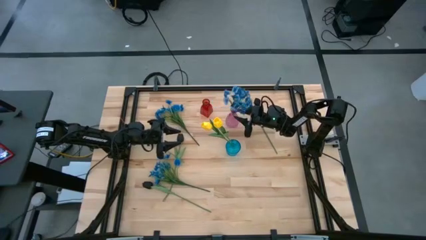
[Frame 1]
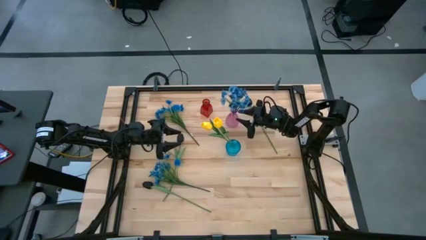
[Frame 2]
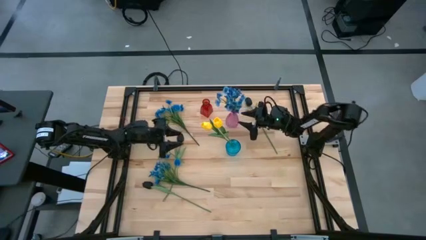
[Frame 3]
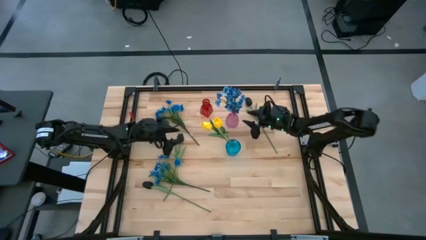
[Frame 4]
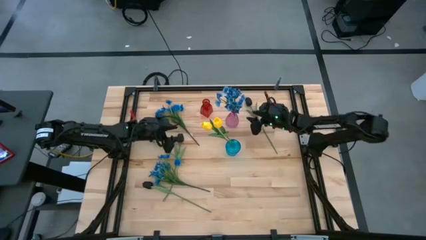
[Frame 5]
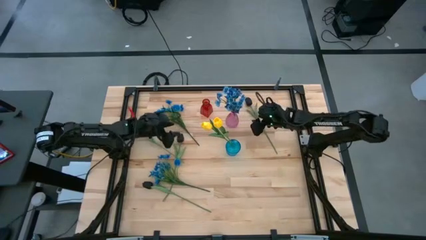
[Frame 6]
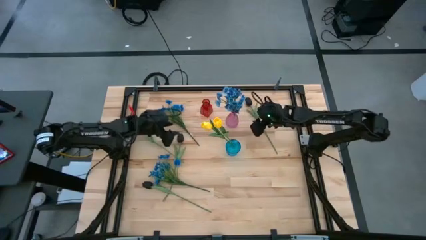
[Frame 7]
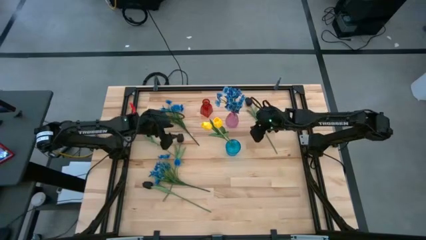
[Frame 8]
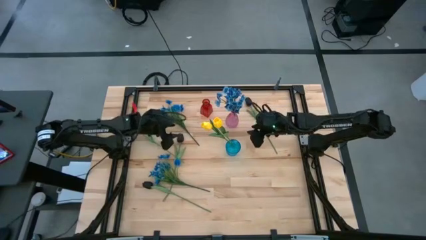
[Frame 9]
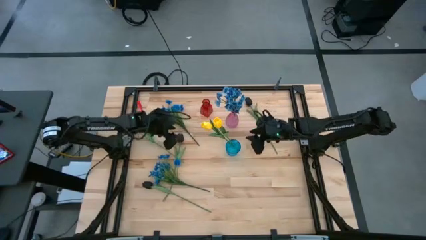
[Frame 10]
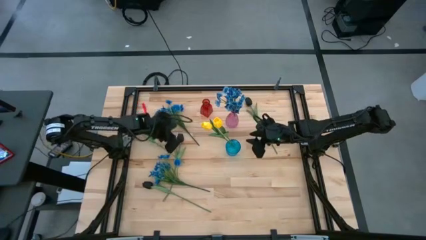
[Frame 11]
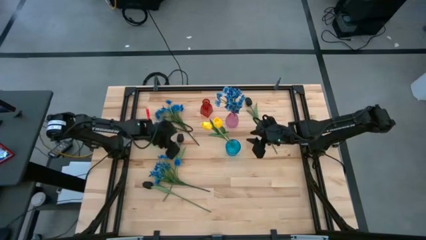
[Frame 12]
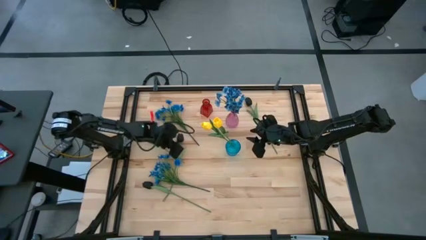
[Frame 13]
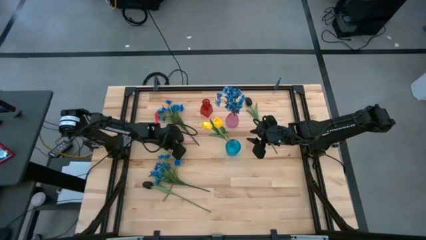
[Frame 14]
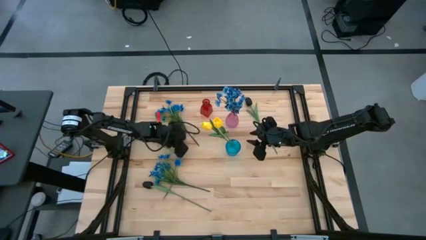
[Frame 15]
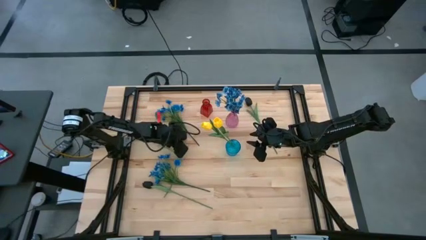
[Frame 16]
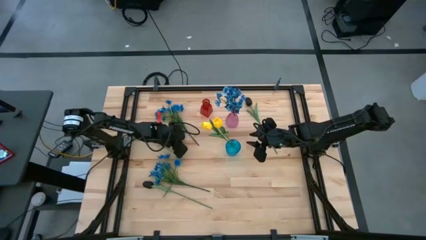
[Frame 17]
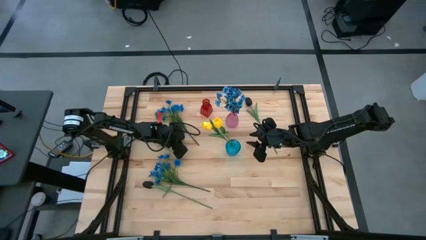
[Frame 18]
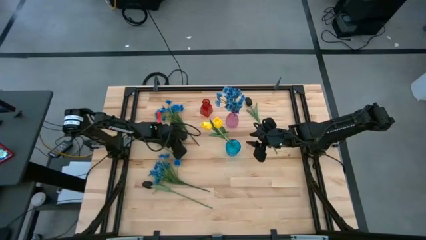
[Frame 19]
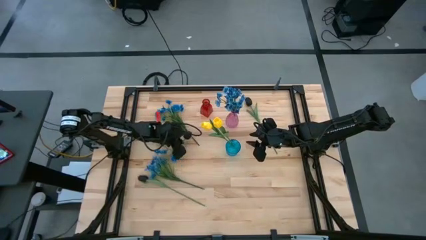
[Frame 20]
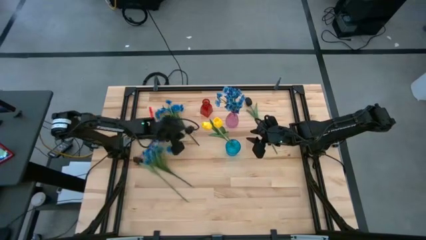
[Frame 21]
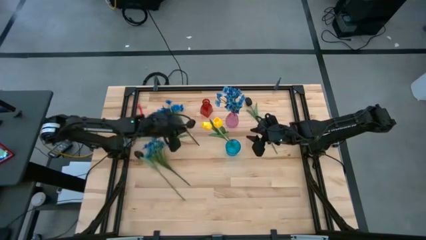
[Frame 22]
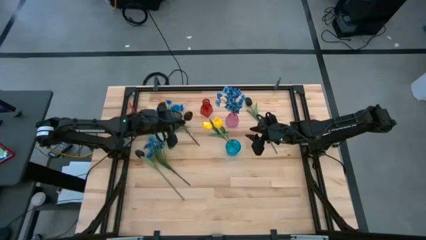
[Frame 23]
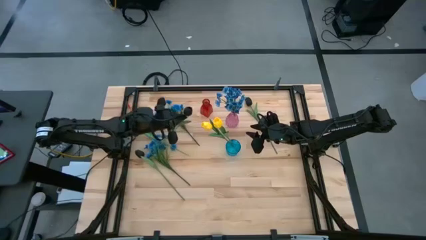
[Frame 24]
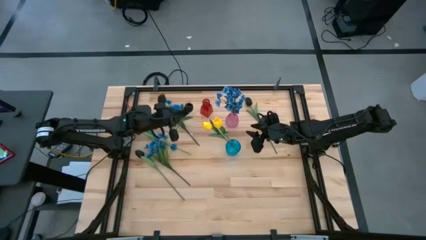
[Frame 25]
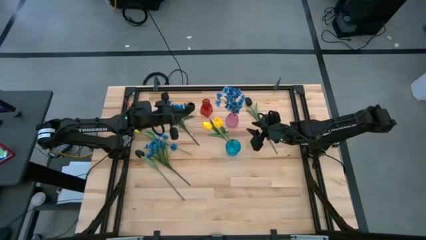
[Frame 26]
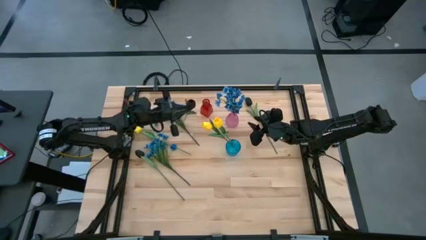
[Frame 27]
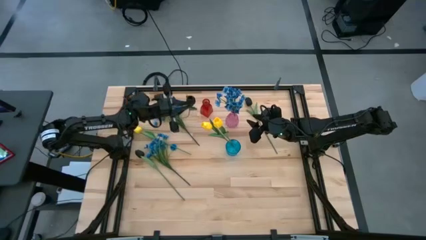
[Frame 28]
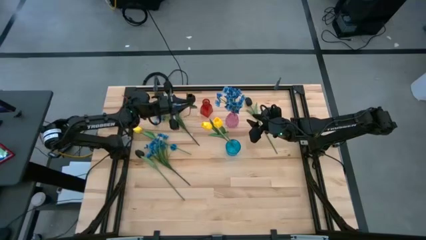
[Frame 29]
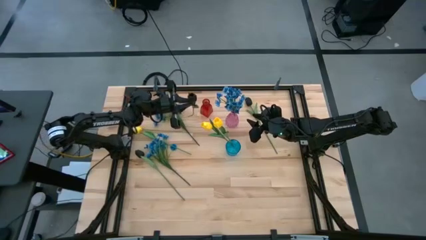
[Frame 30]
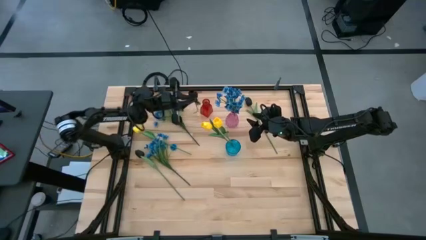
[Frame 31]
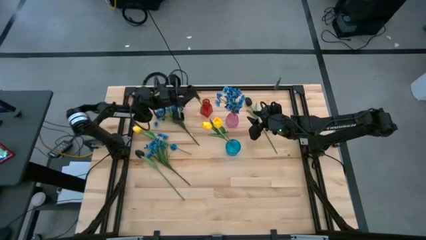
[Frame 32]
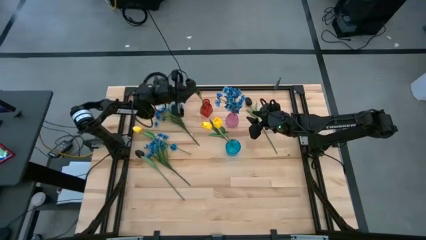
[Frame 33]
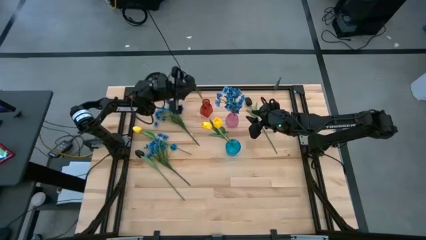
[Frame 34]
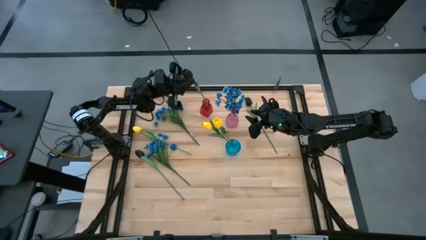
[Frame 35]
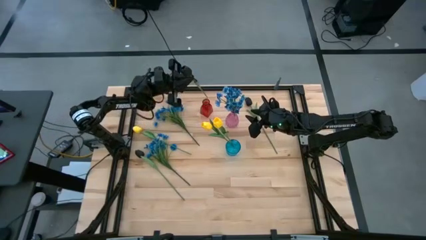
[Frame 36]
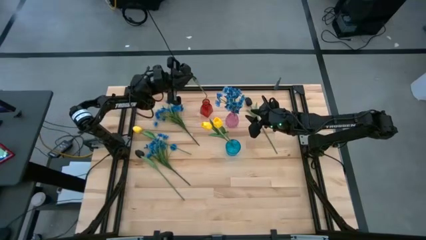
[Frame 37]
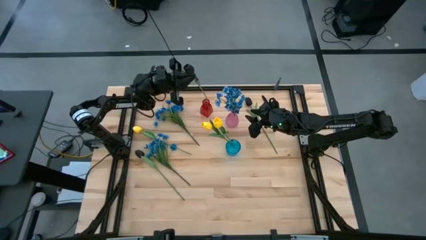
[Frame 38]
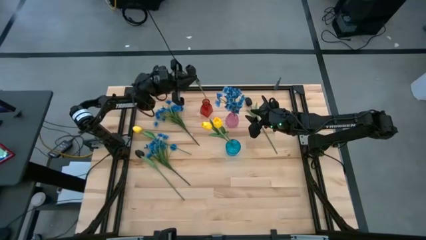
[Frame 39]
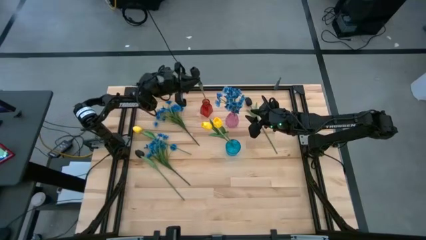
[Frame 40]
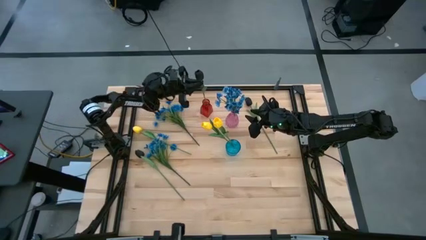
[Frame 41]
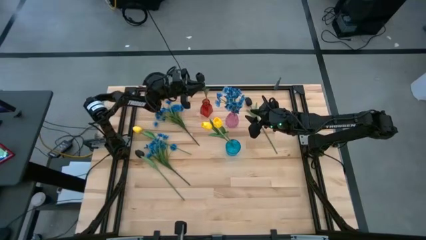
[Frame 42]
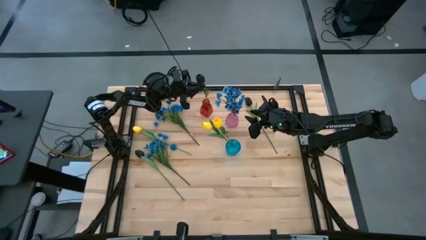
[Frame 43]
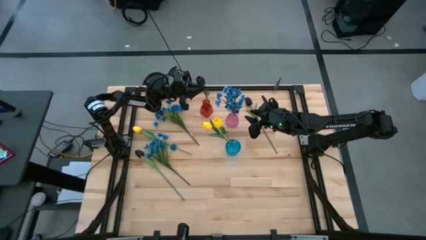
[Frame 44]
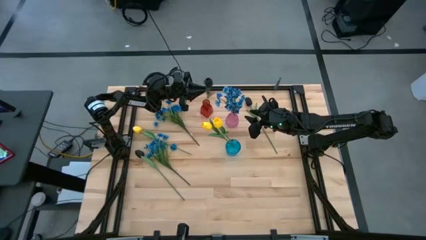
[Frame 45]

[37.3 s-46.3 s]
Task: Sort flowers into vase by color
Put the black flower into the red vase

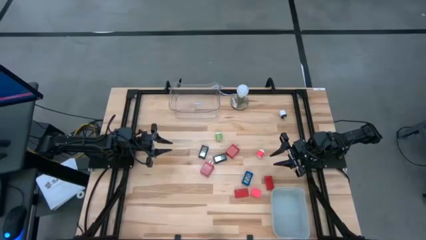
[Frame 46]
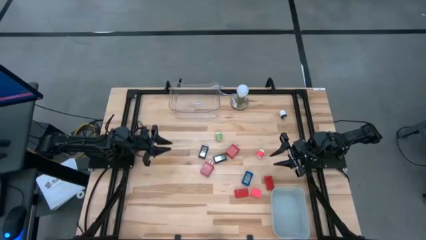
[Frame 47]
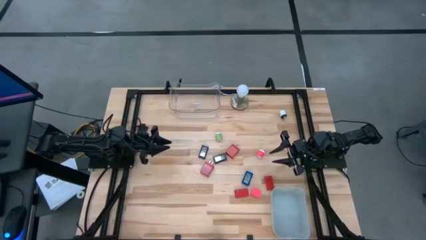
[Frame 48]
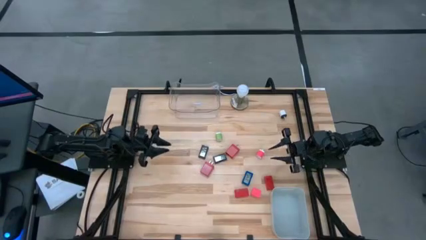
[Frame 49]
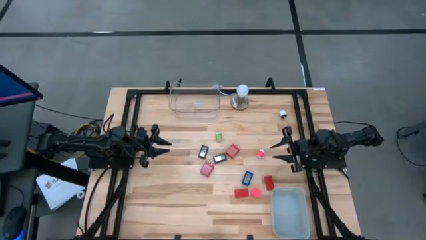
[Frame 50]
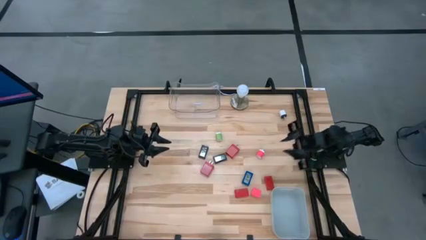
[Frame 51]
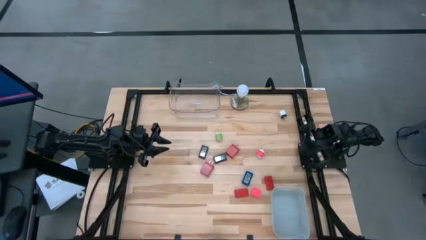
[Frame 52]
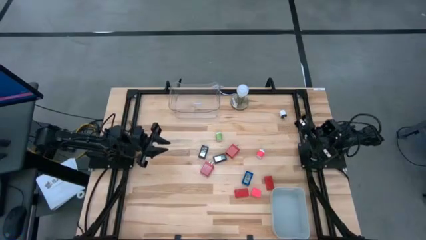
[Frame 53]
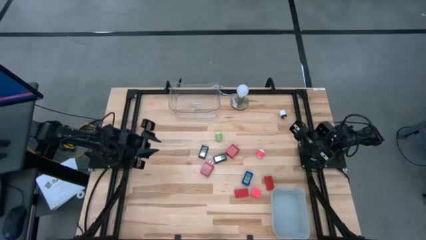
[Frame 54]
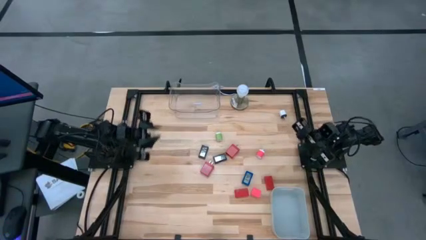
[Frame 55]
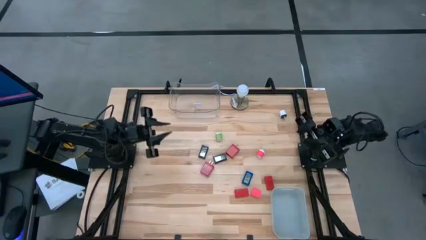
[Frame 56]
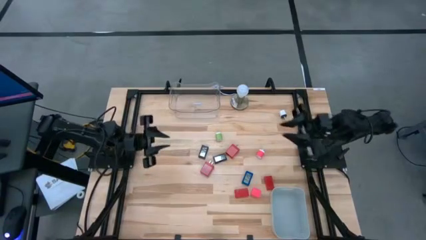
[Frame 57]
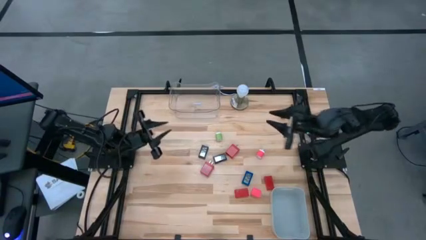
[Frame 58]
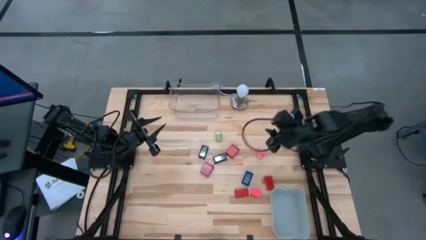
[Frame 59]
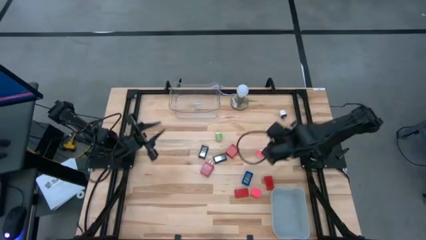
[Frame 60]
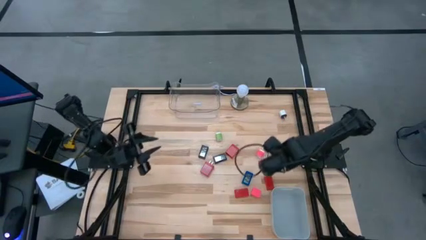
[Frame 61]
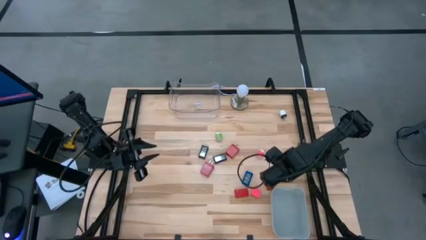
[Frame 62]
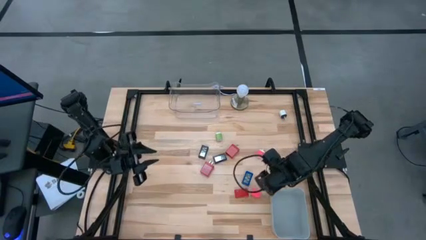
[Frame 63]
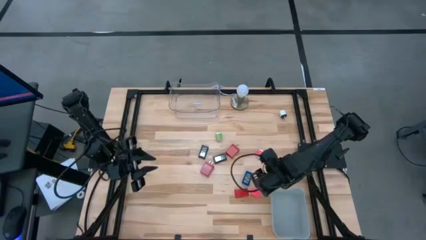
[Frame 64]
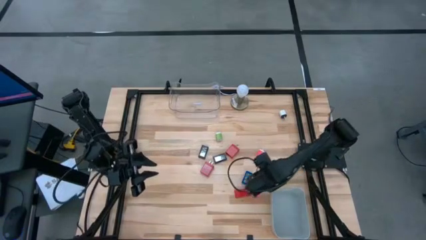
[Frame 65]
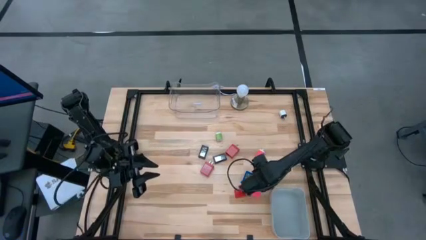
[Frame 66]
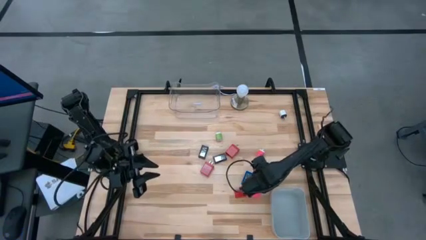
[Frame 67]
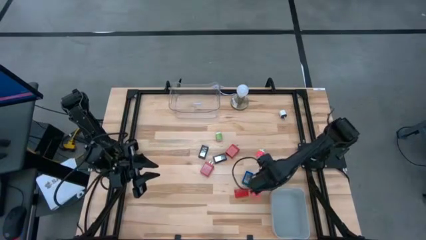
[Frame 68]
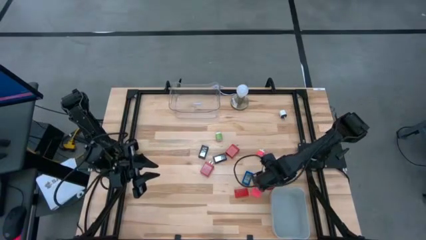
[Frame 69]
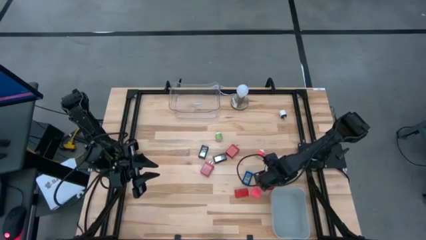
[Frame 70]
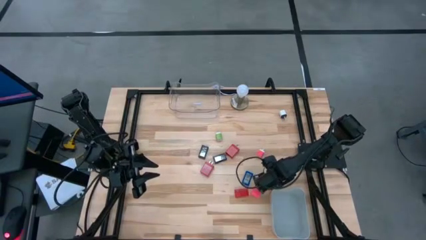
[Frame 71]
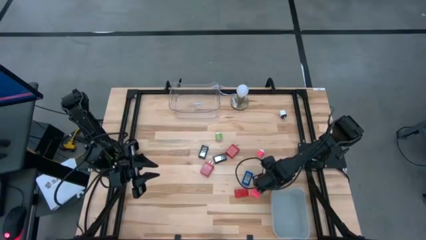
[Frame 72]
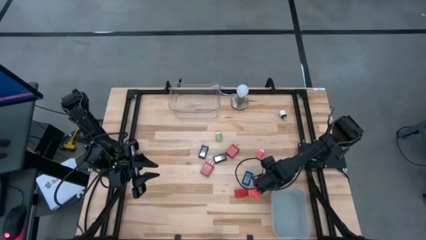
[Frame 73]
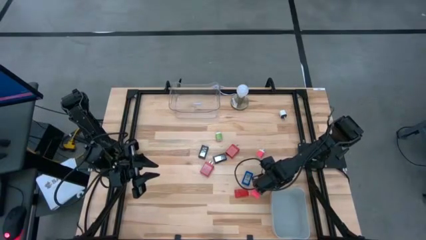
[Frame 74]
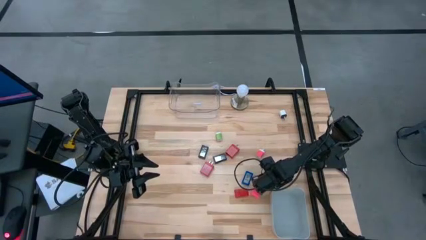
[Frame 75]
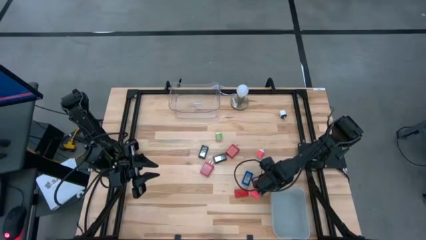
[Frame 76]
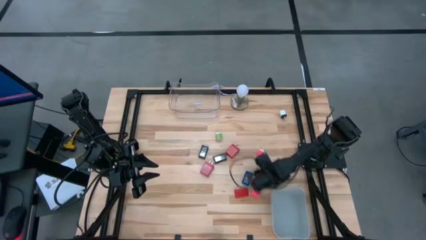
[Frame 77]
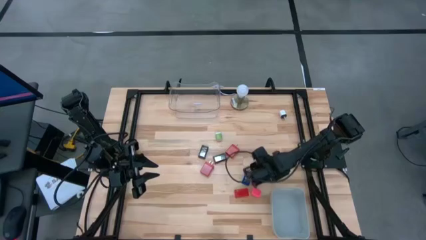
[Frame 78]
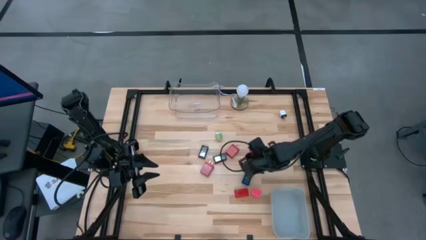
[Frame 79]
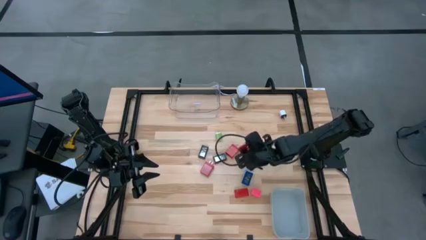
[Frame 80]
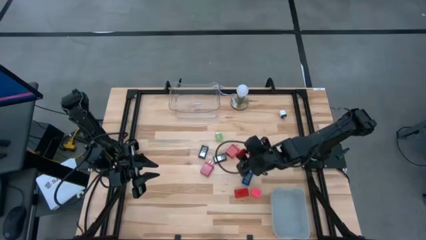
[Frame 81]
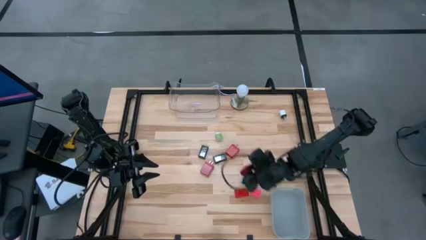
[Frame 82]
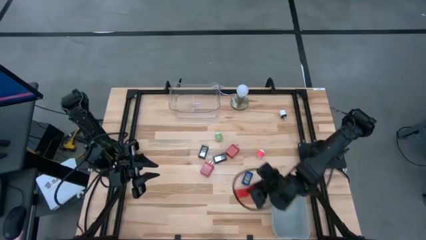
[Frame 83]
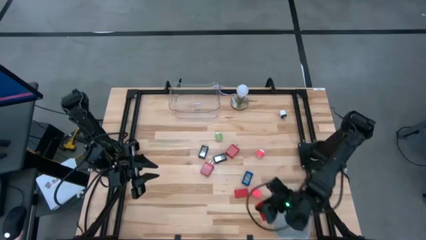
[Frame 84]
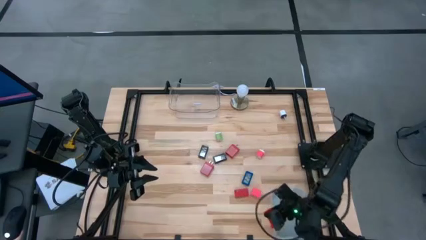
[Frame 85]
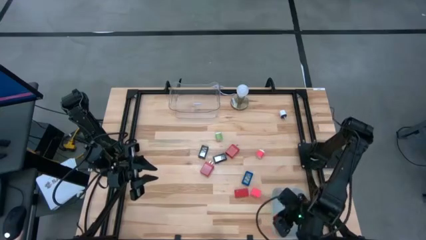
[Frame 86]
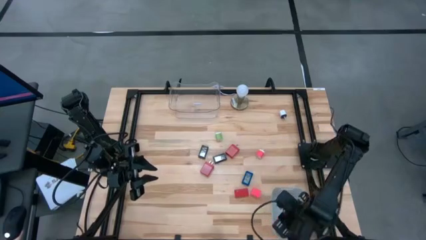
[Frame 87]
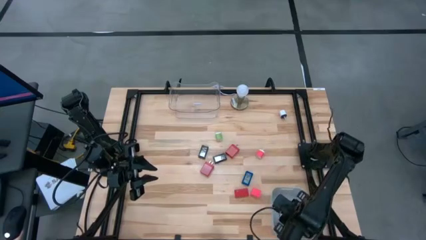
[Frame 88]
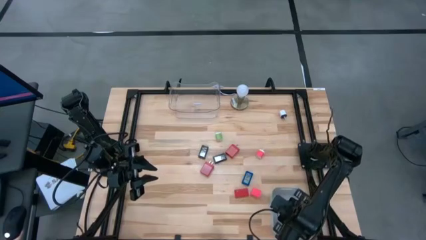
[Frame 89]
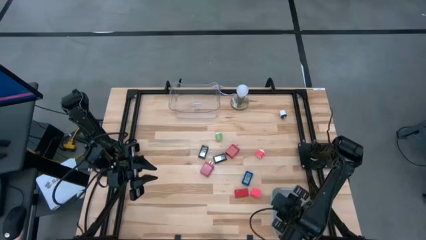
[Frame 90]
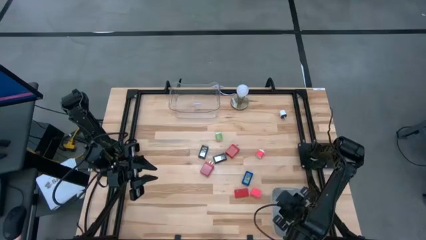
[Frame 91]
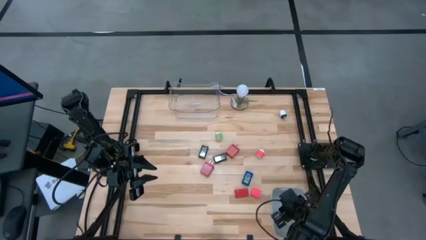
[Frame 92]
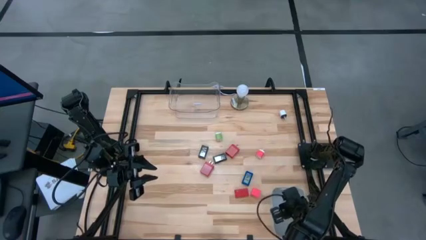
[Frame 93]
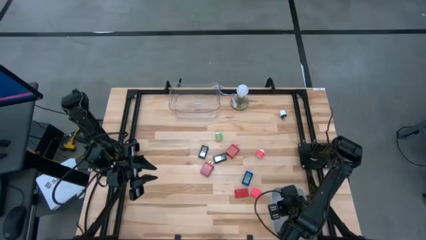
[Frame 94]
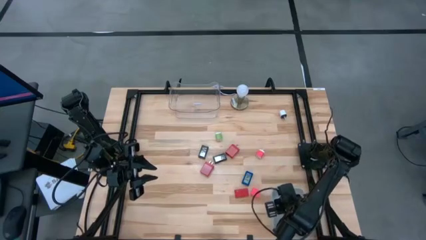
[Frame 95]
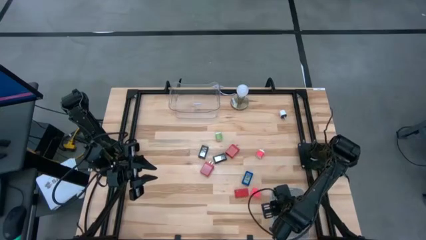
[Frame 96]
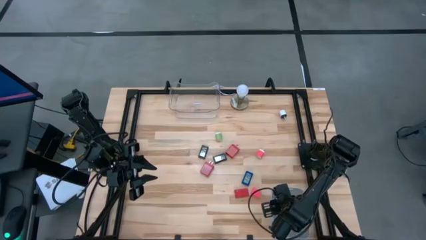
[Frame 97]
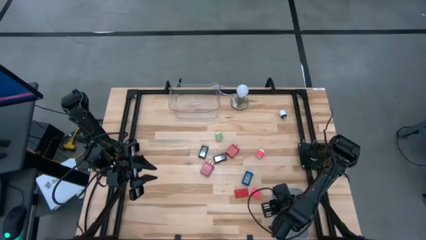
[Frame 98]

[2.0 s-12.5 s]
Task: Pick & Place Office items
Put the right red digital clock into the gray bin
